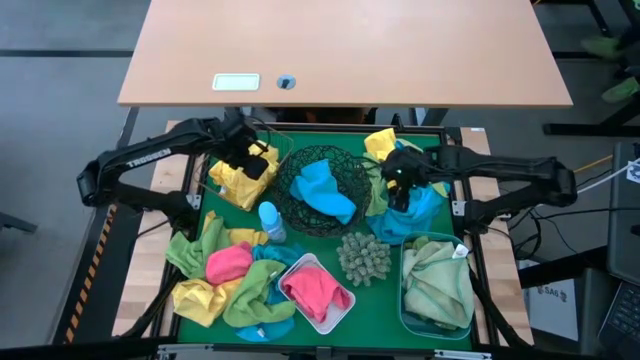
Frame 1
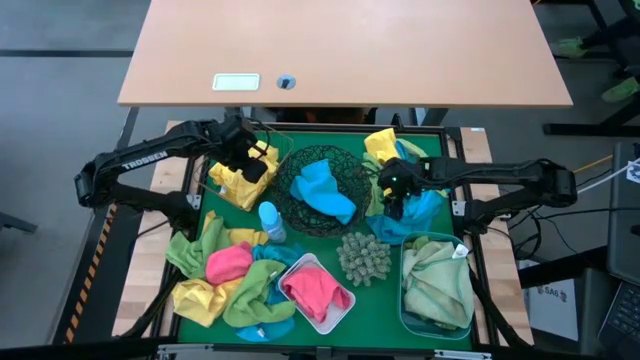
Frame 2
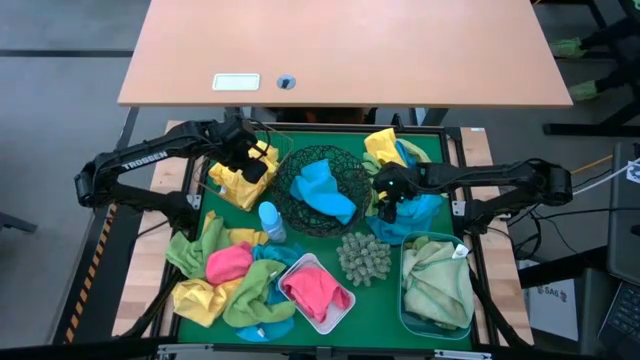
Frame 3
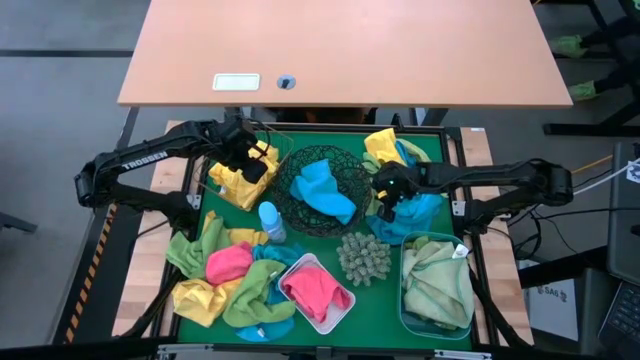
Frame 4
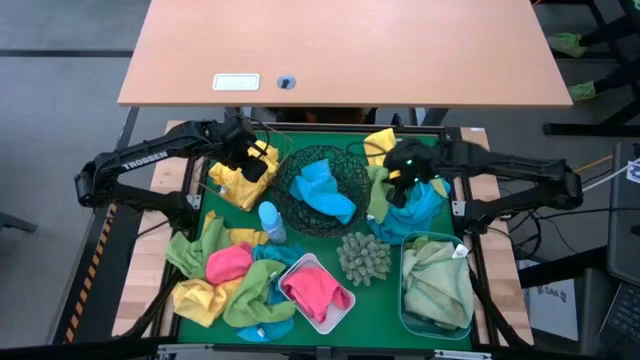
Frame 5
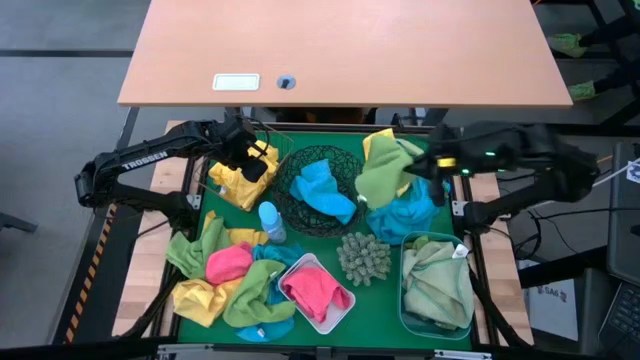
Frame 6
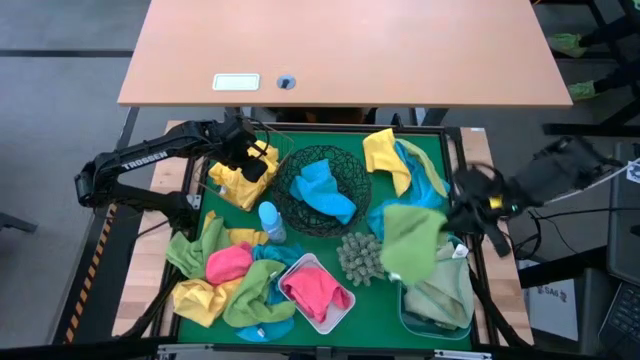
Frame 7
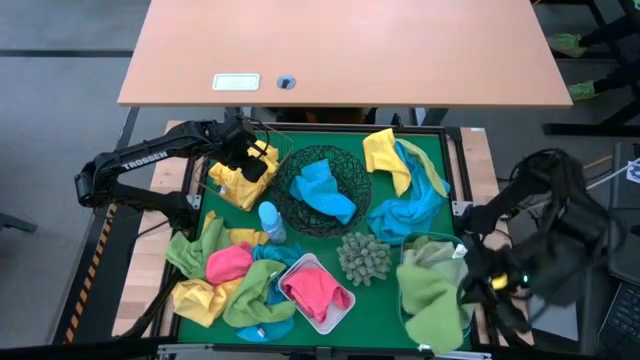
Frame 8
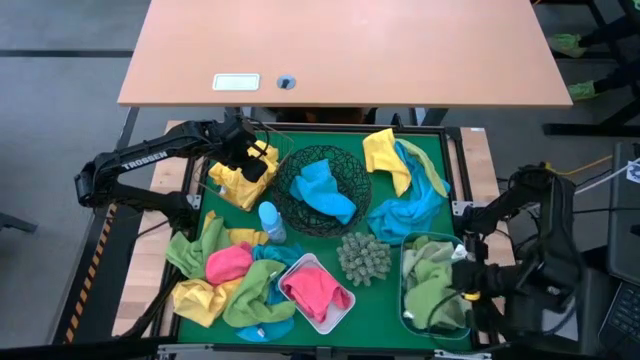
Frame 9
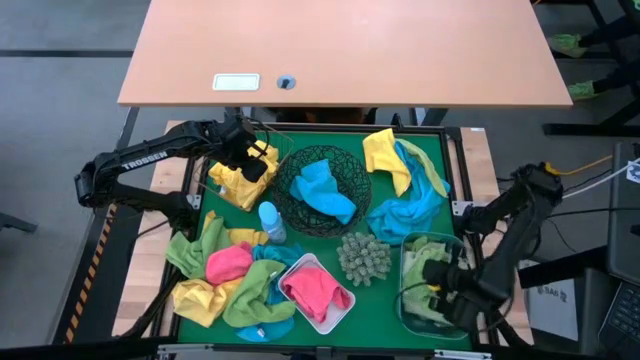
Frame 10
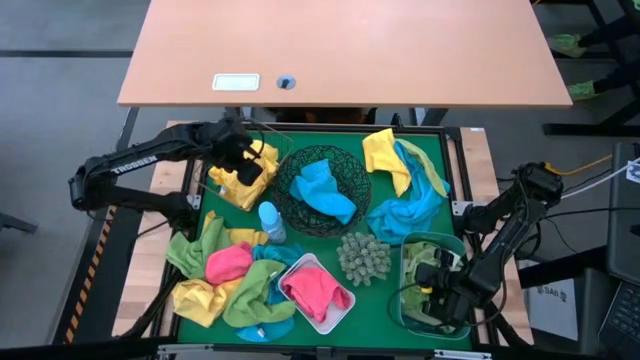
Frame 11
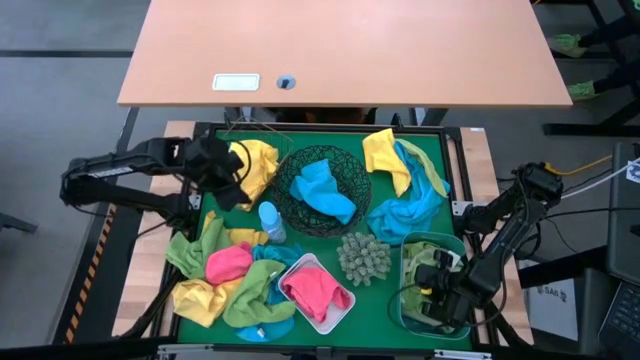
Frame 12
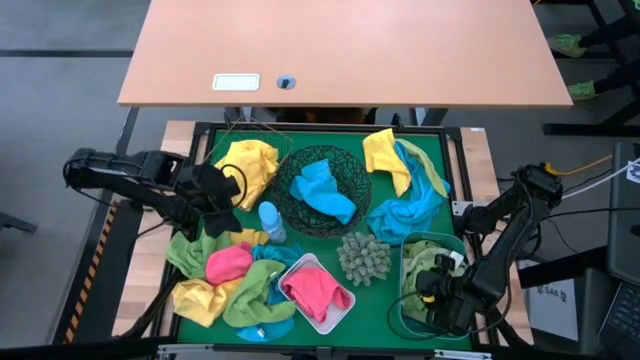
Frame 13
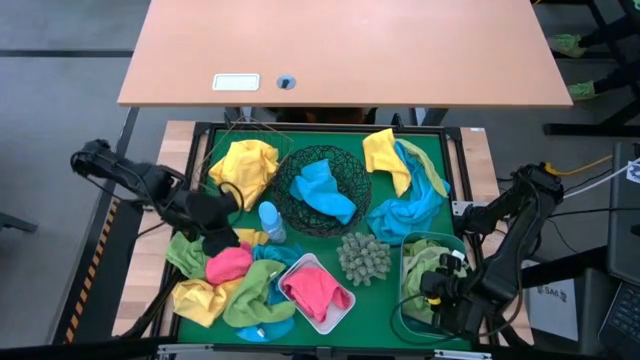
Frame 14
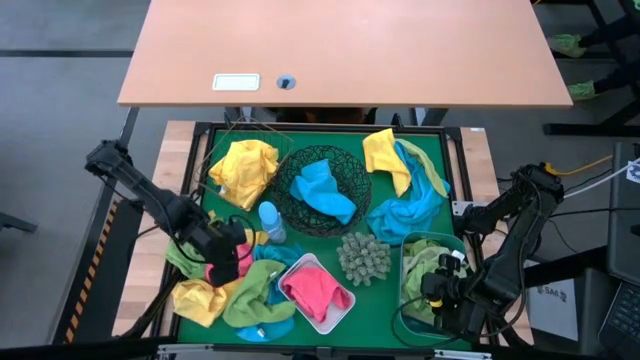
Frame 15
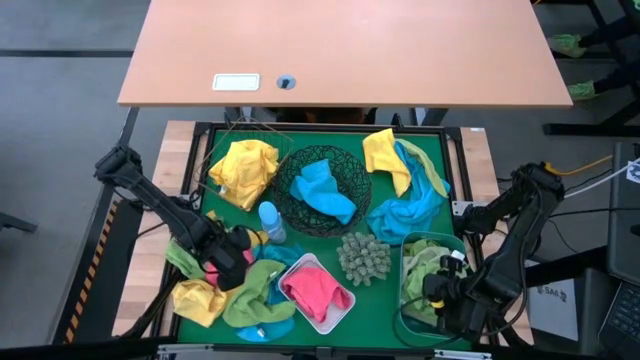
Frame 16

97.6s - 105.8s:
Task: Sort microfiber towel by color & place in baskets
Put the green microfiber cloth into the blue bin

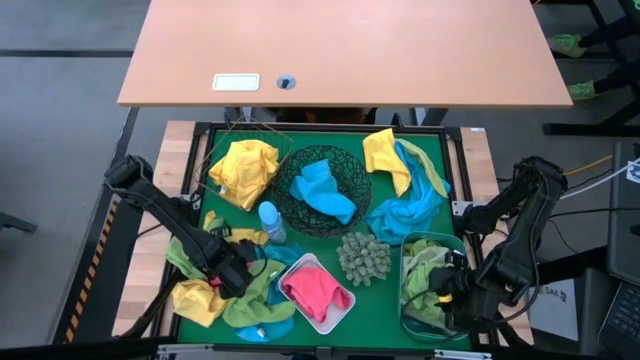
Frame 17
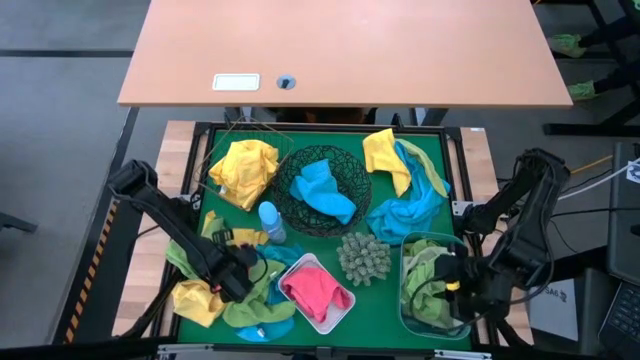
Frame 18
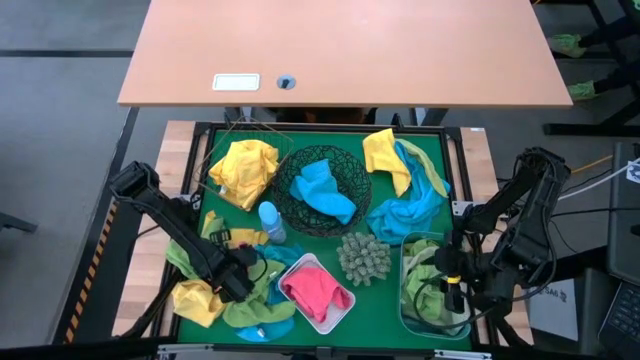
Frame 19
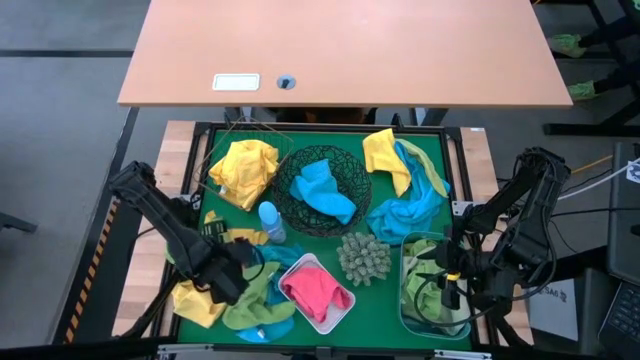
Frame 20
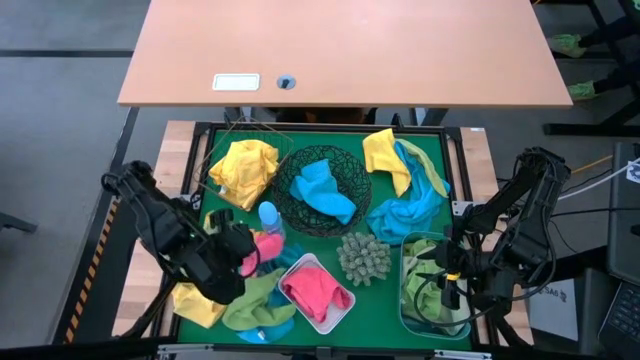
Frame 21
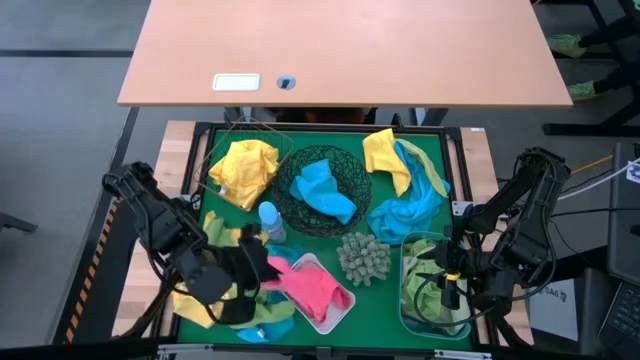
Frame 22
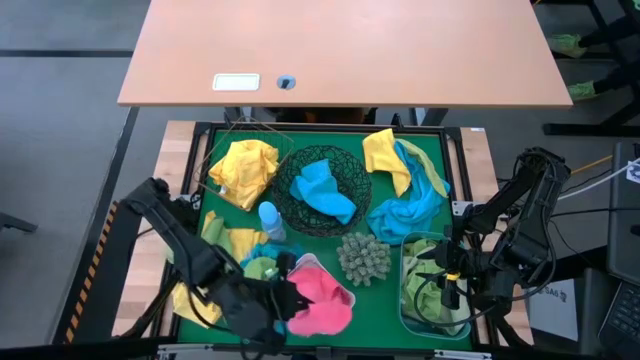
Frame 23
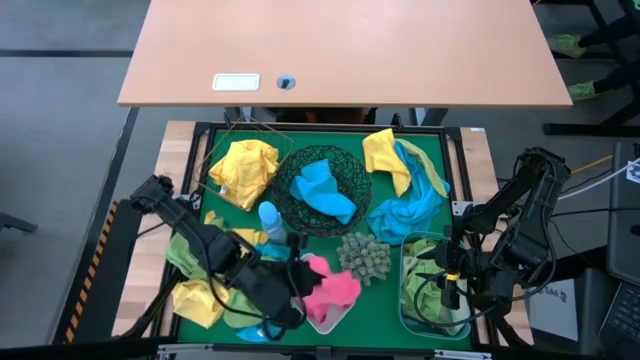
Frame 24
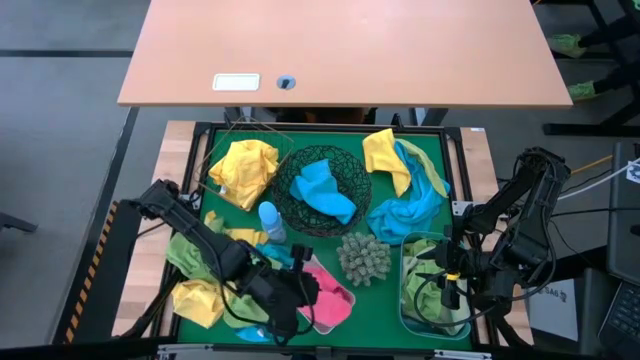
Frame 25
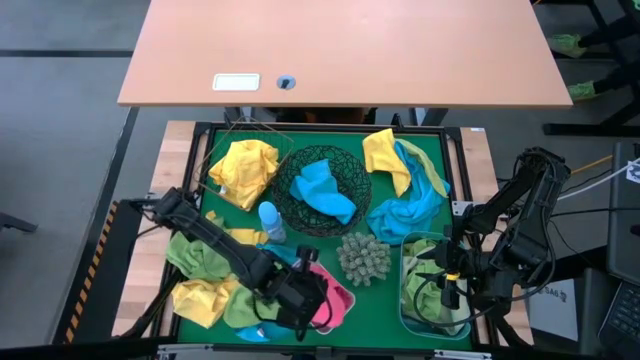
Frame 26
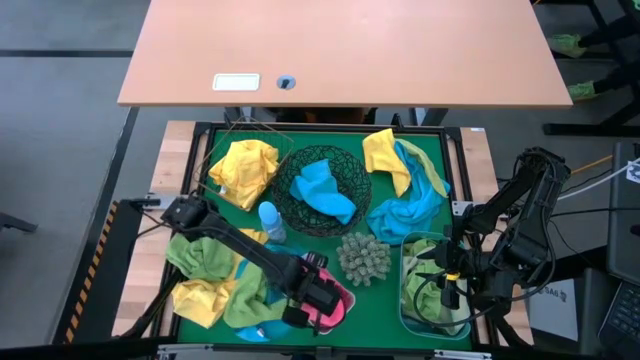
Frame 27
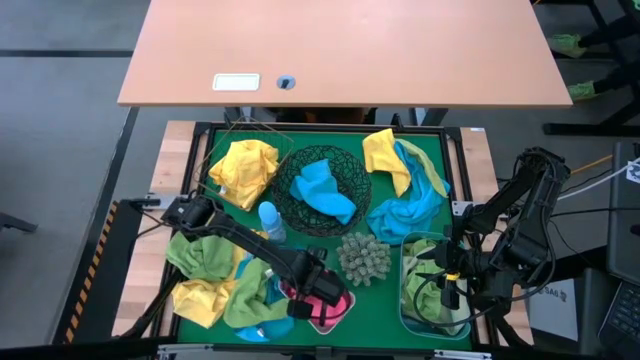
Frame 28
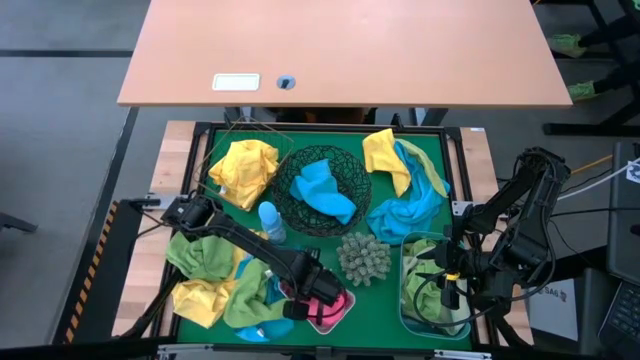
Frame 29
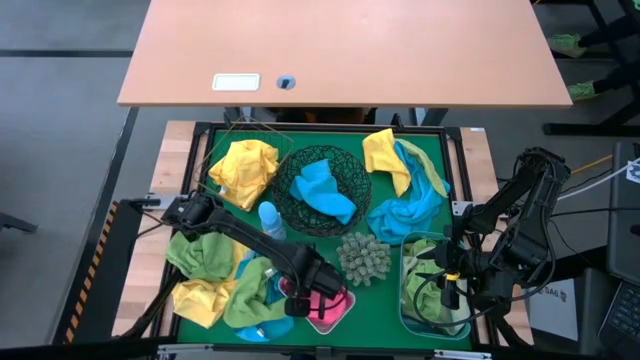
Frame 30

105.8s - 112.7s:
Put the pink microfiber cloth into the white bin

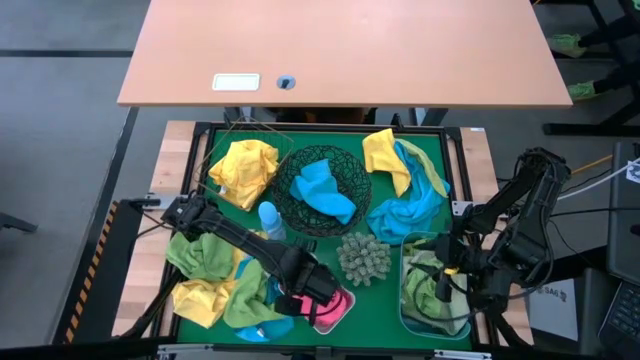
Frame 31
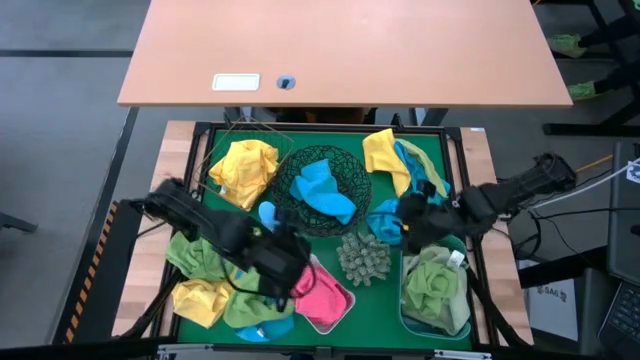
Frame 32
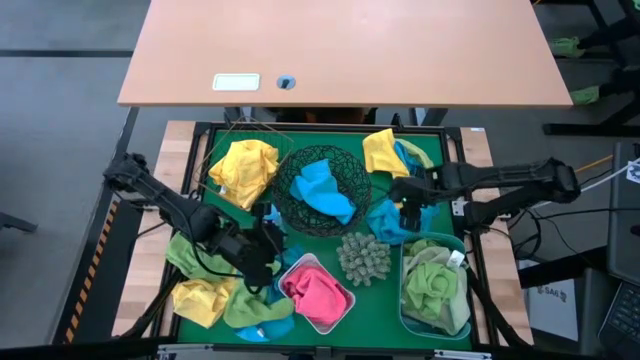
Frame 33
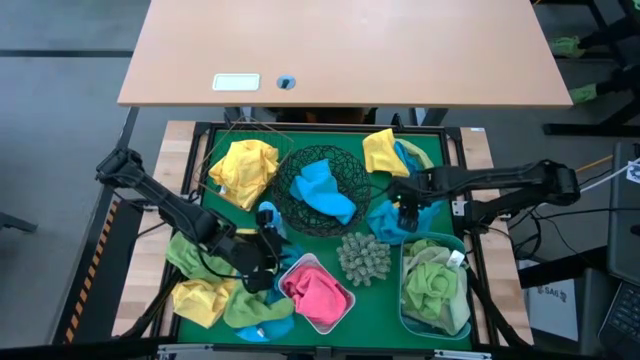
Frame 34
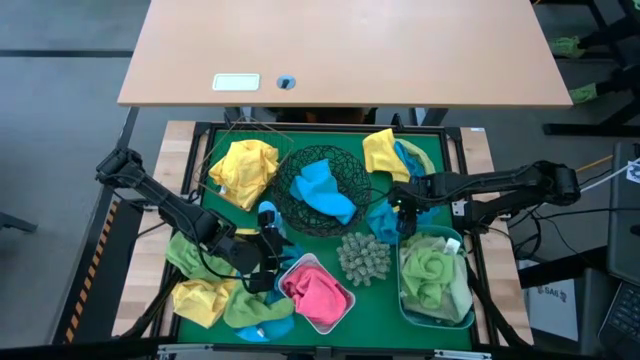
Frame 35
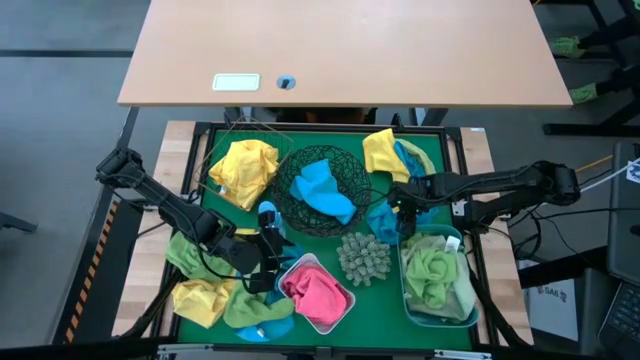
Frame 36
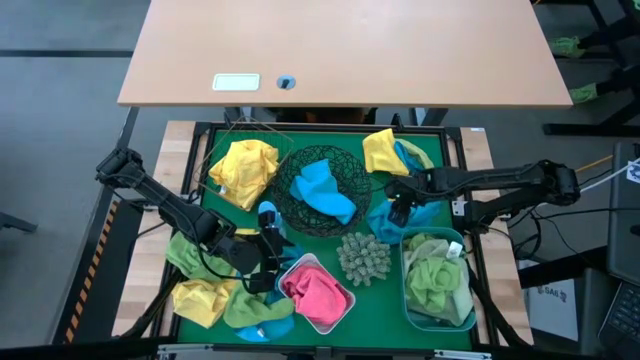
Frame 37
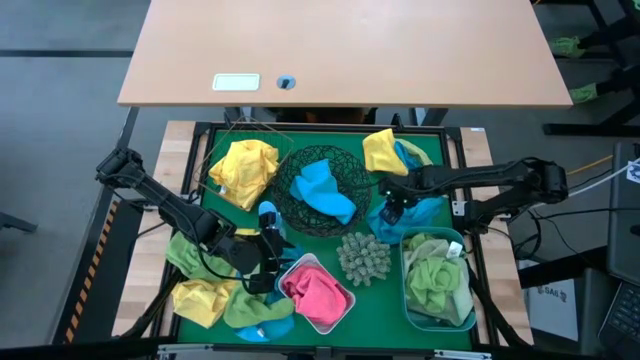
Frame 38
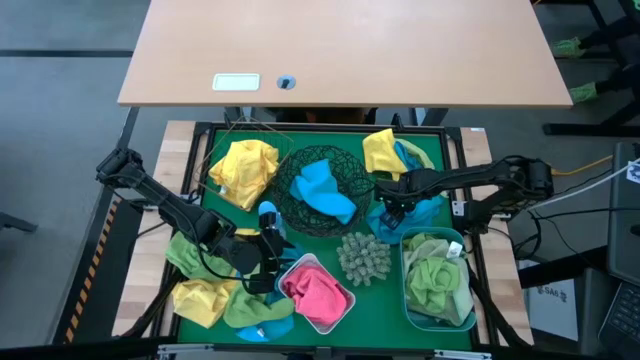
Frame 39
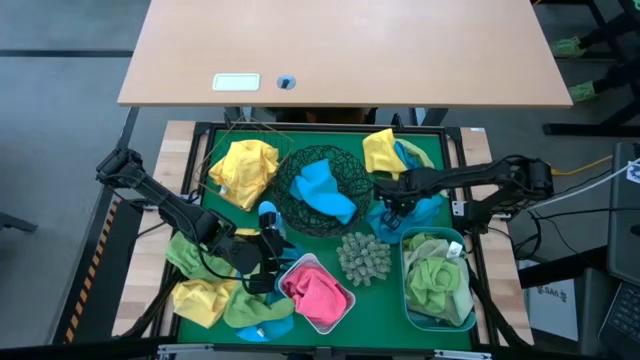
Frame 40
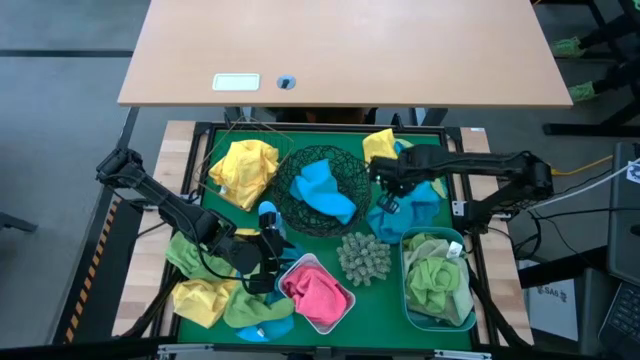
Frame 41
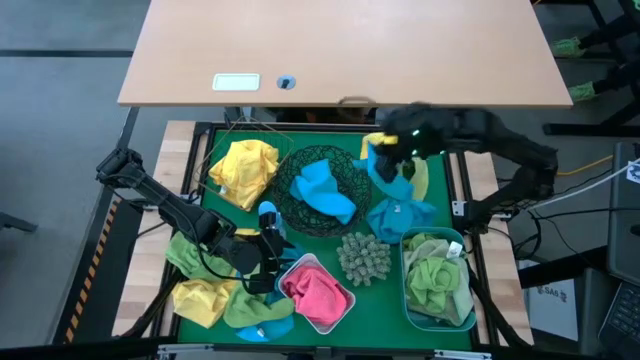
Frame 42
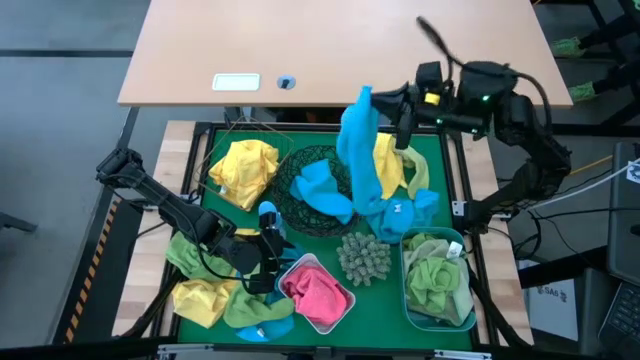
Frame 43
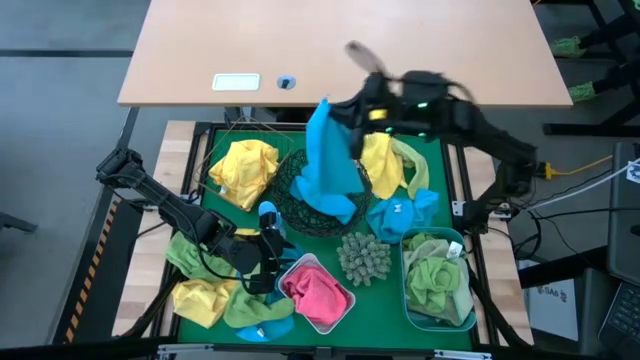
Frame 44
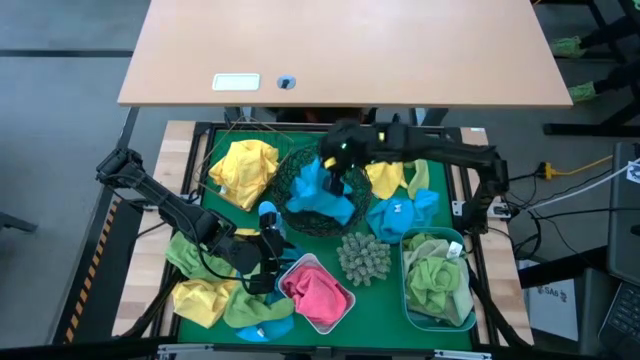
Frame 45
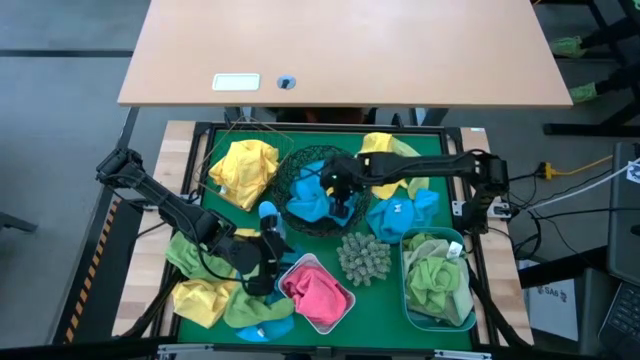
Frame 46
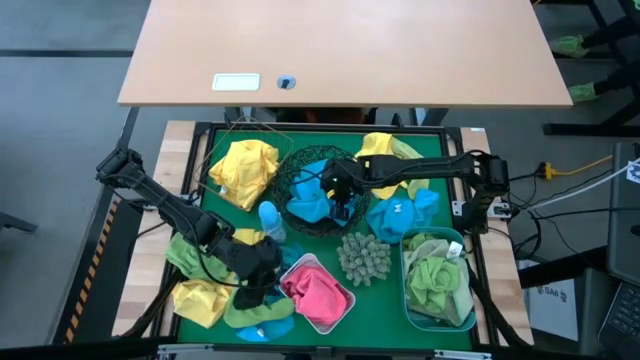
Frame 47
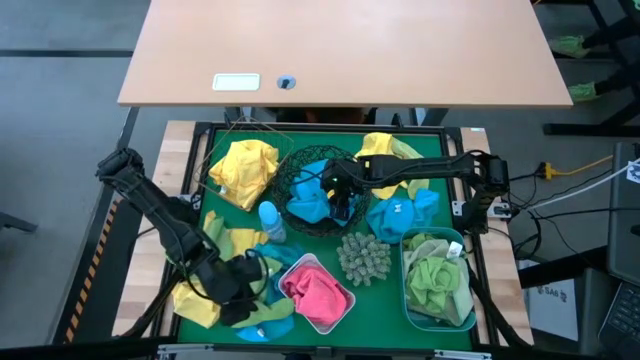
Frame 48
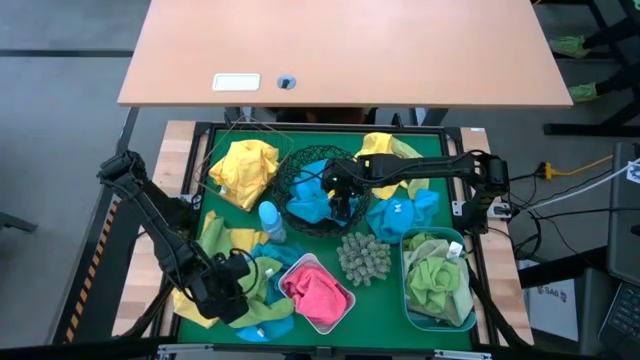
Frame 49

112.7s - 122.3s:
Put the blue microfiber cloth into the circular wire basket
